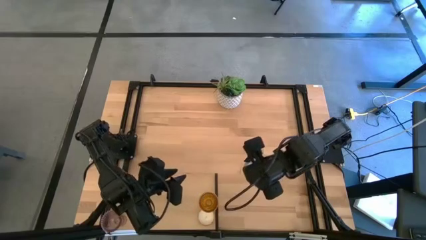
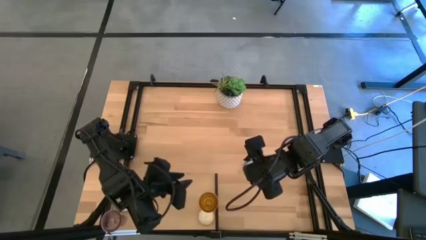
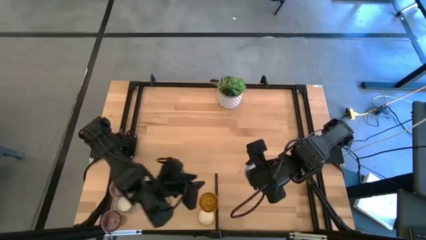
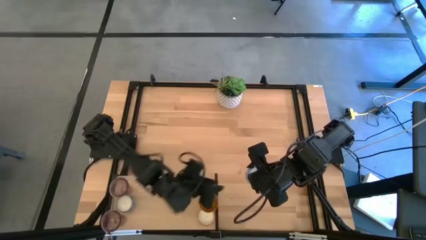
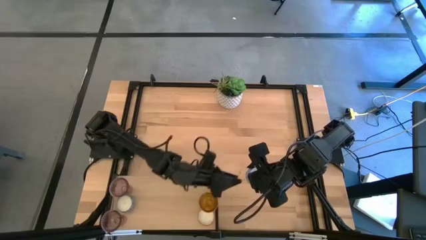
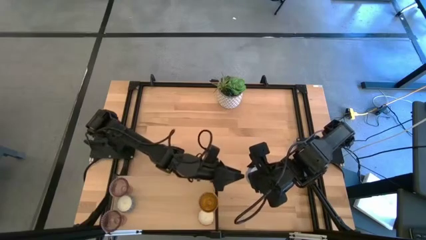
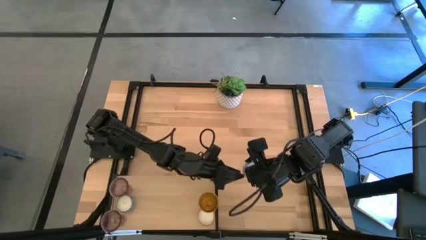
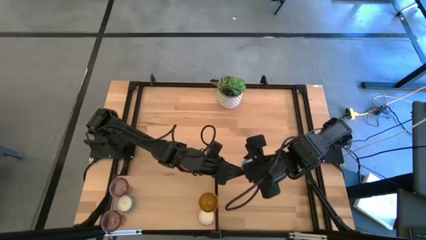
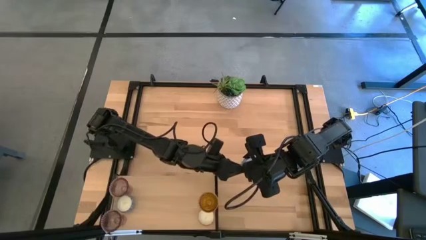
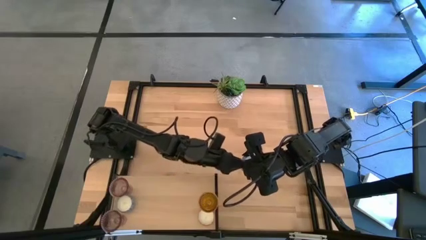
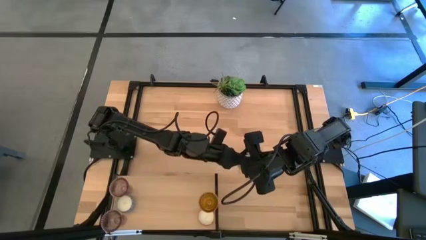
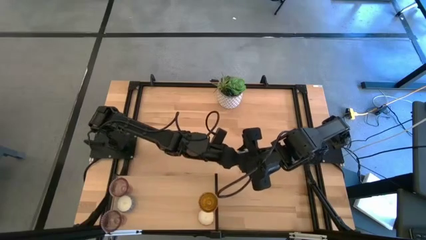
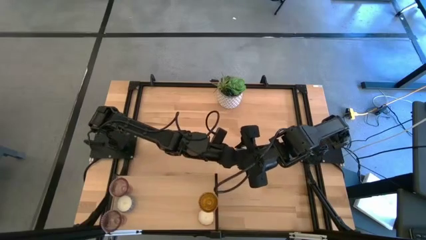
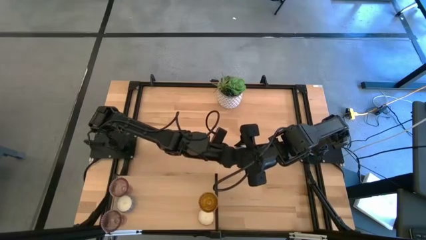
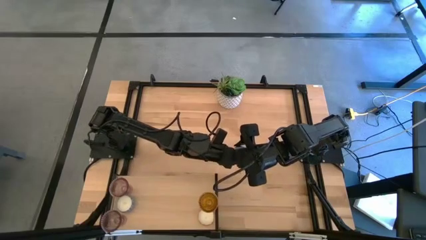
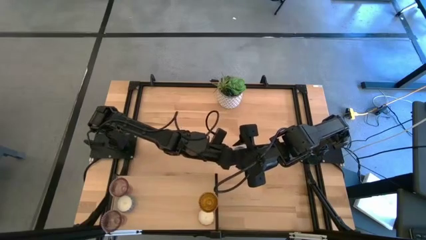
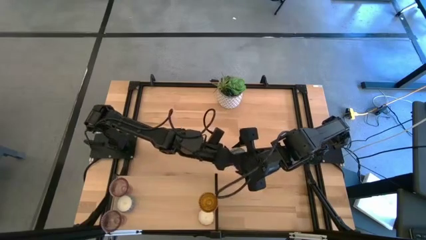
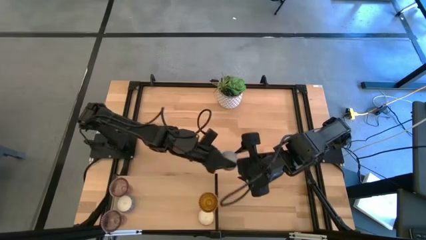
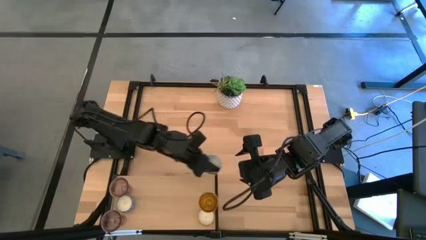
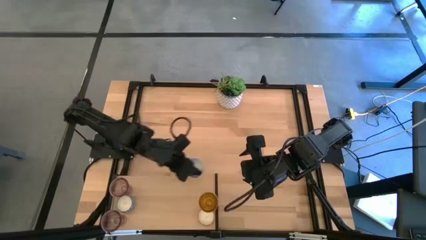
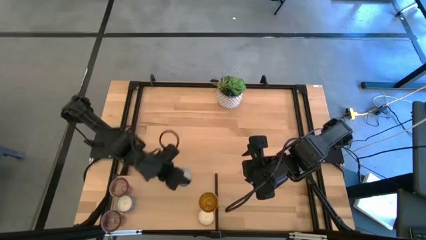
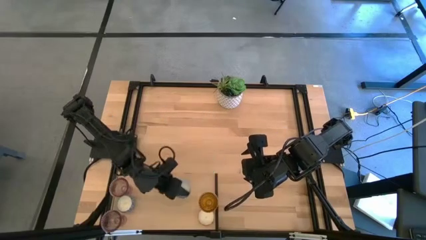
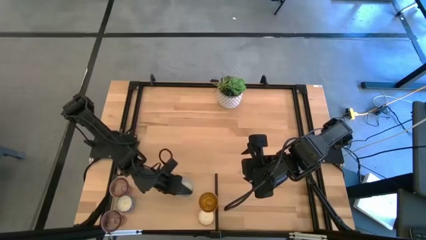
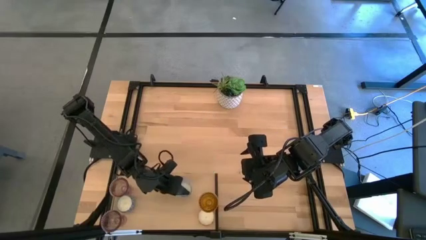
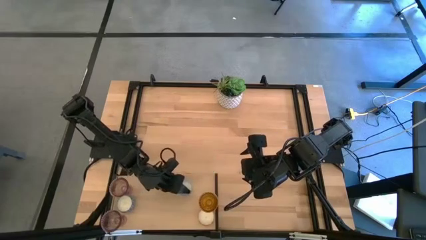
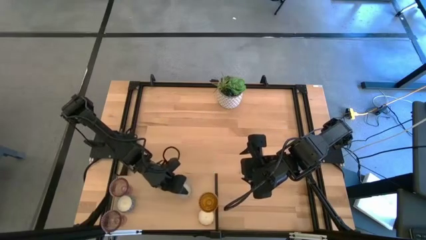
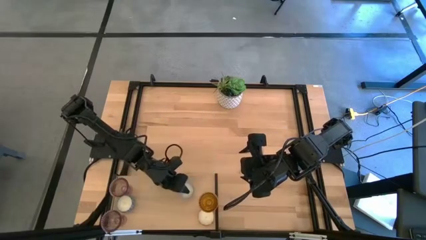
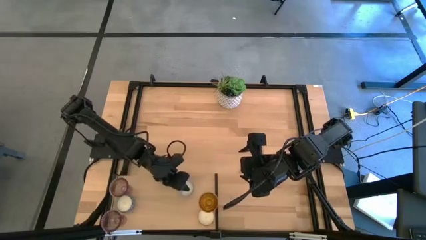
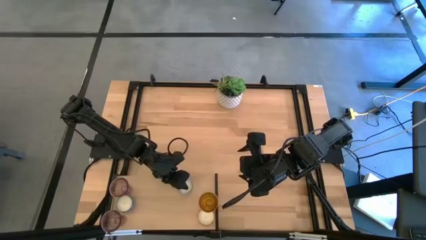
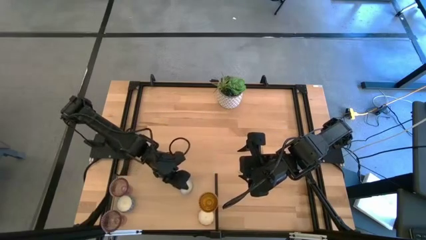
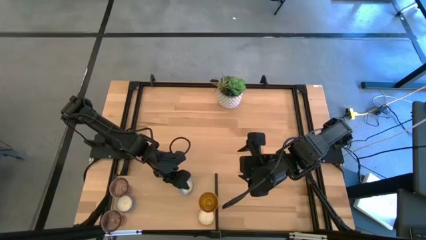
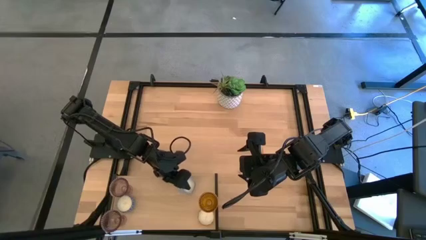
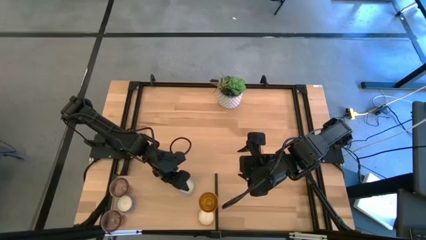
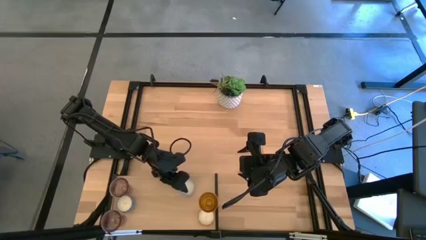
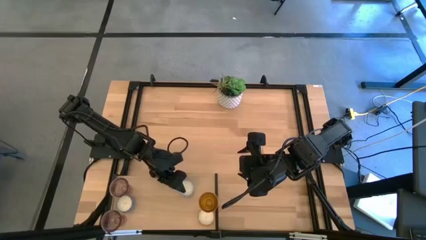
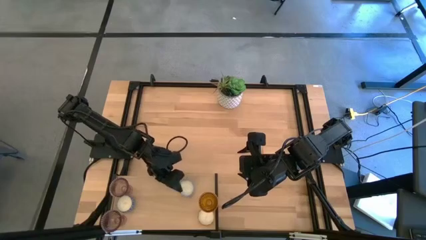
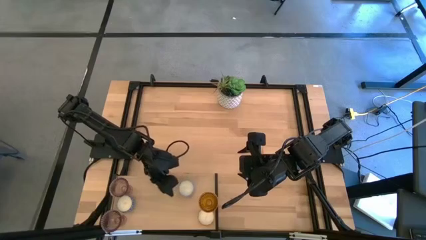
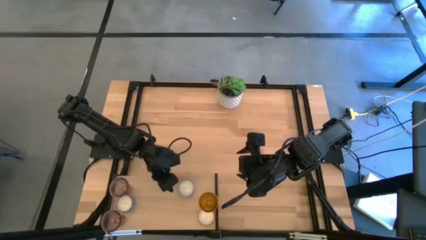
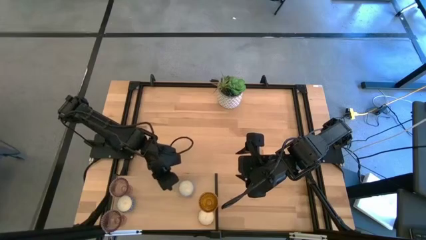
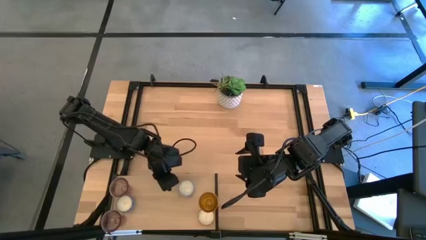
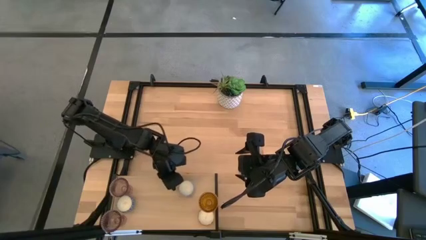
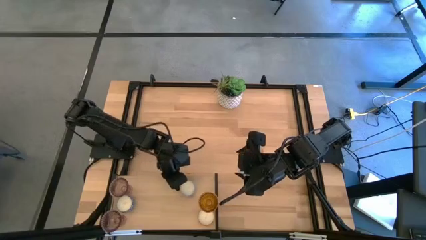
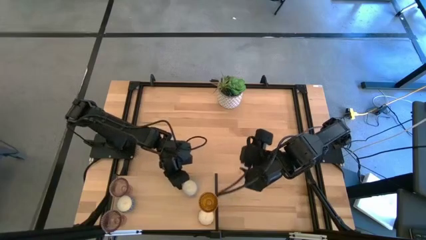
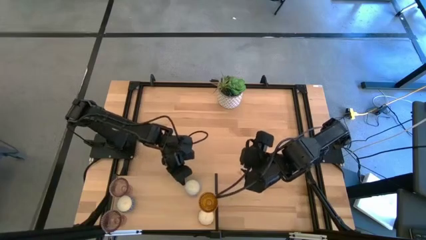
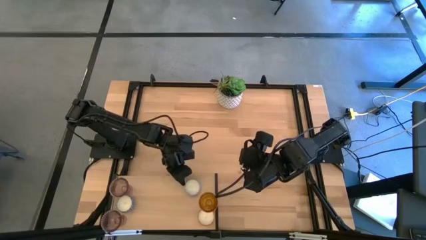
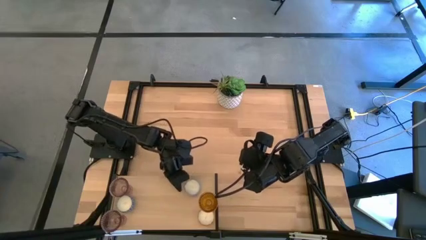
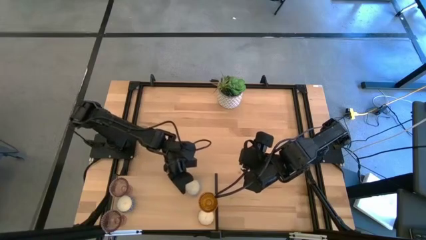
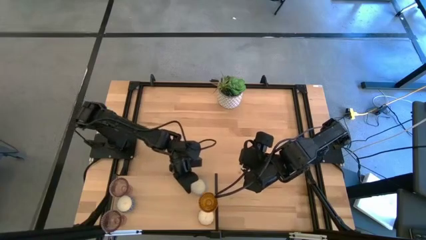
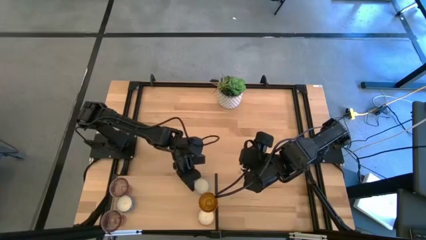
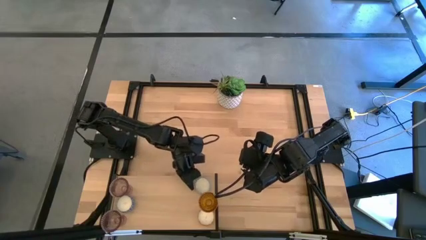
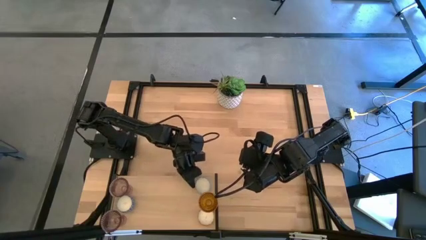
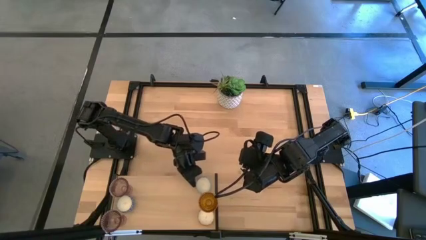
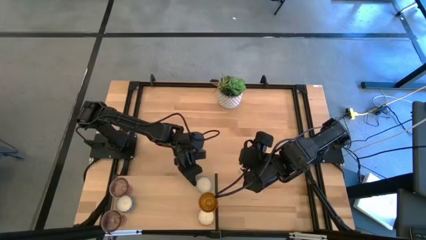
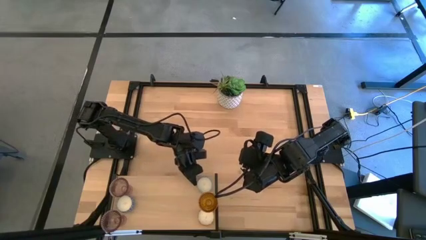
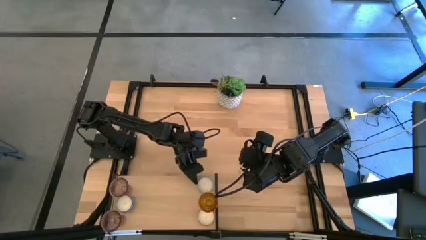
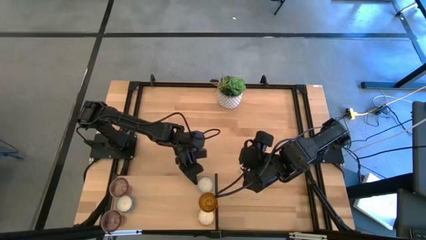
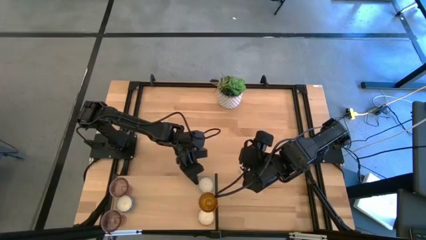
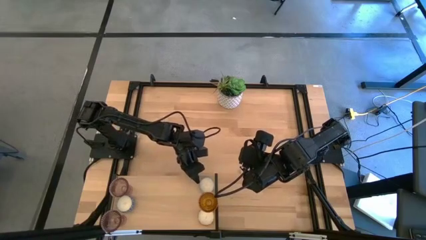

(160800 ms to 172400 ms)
Task: Pick & Place candle stick holders
Put the blue scented candle on the shelf

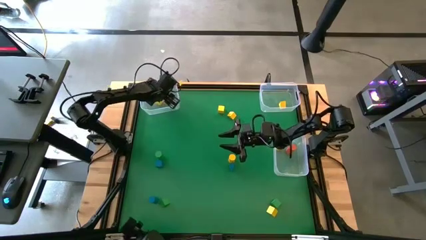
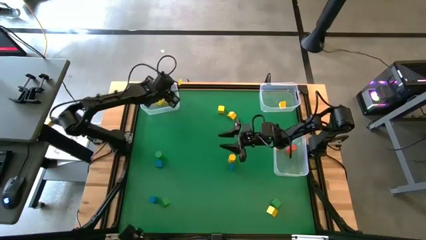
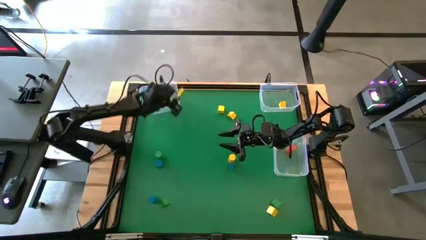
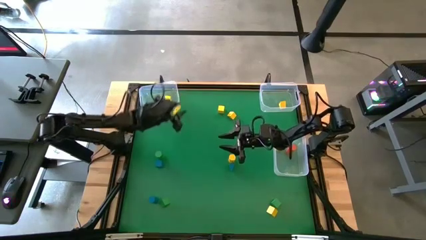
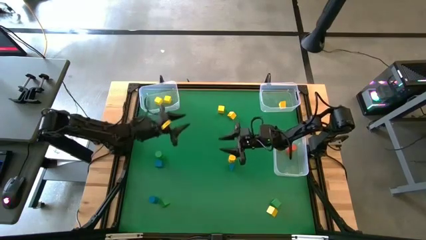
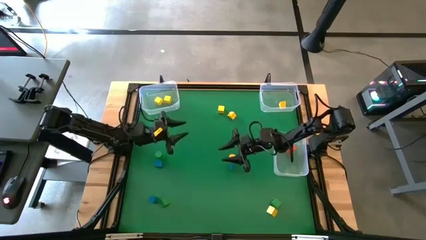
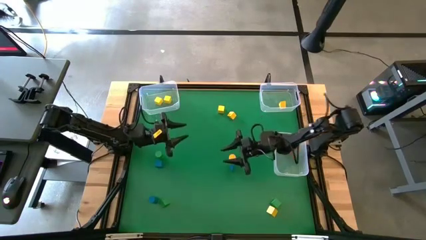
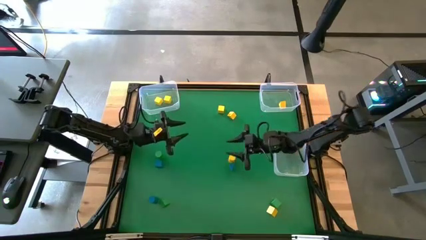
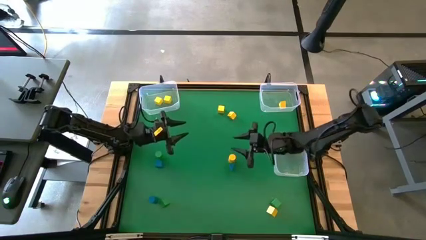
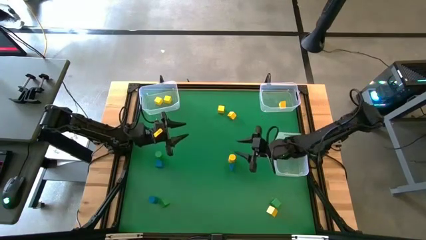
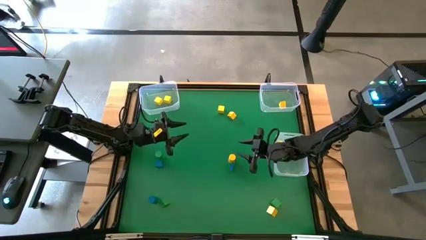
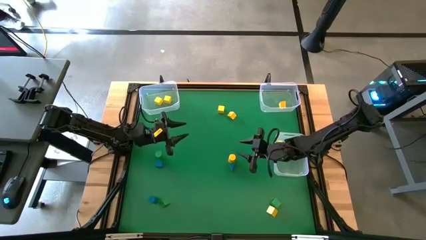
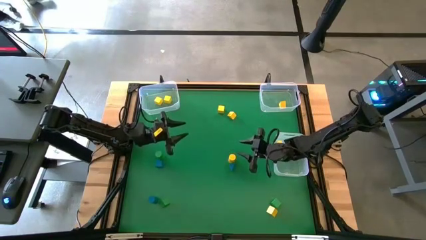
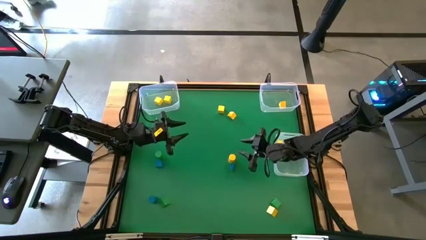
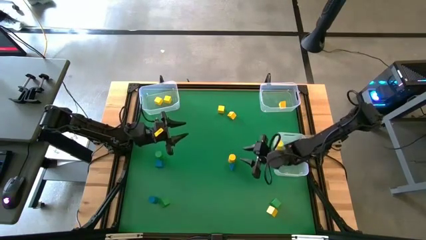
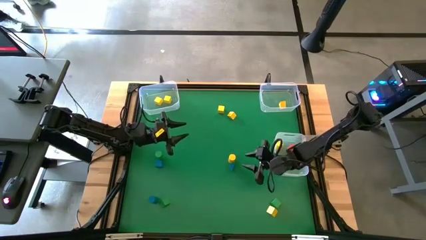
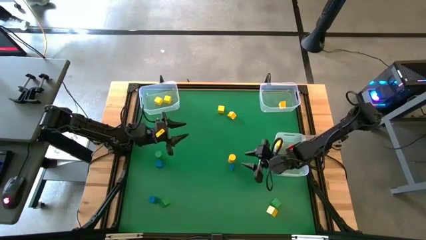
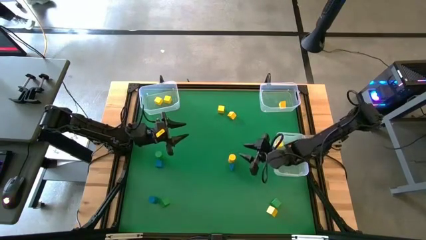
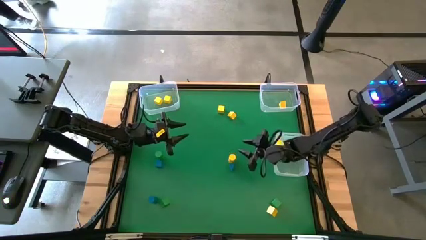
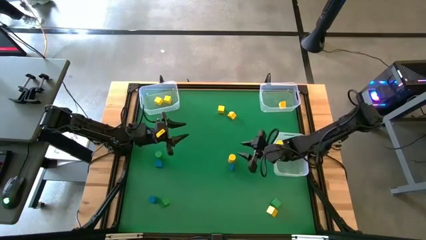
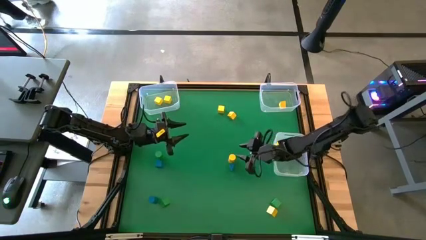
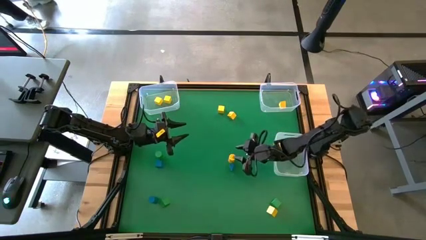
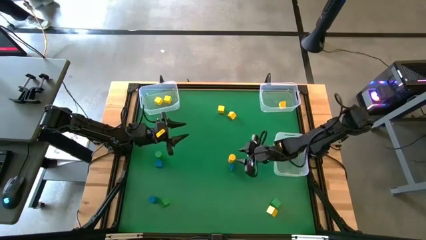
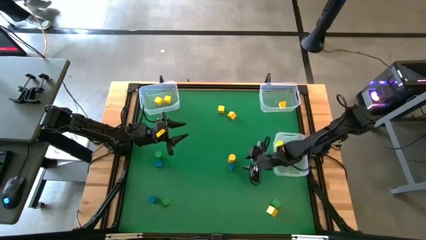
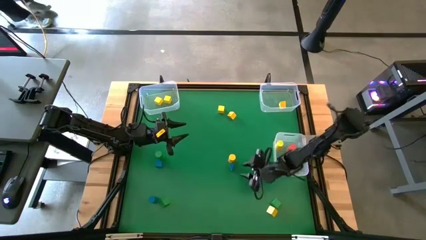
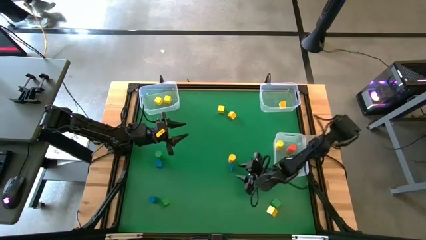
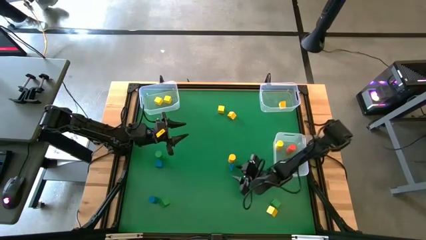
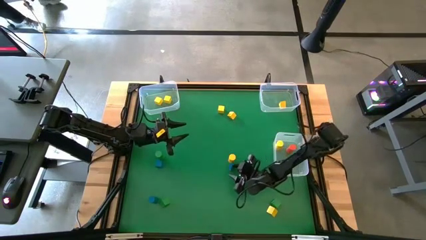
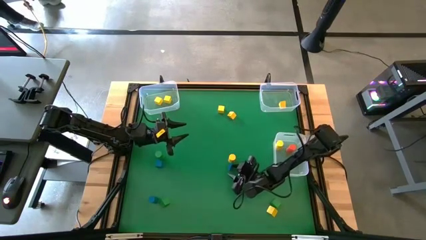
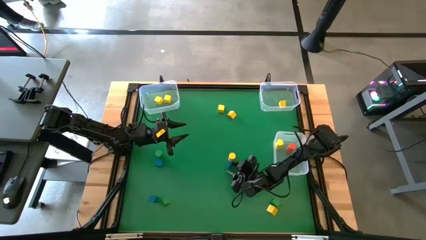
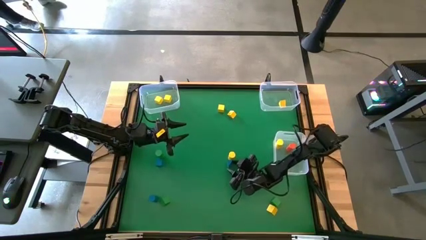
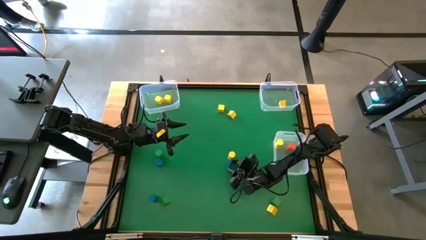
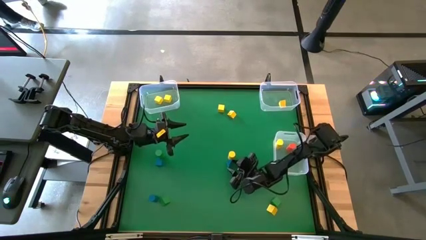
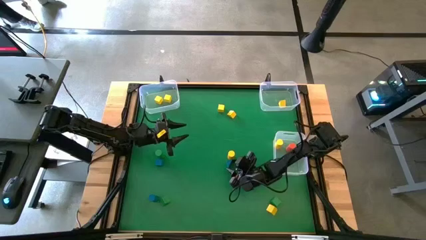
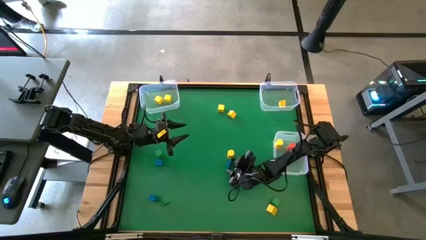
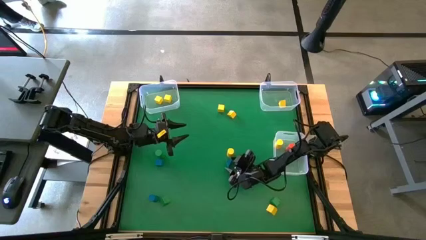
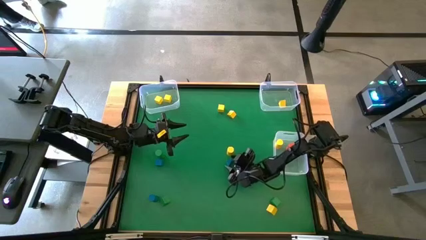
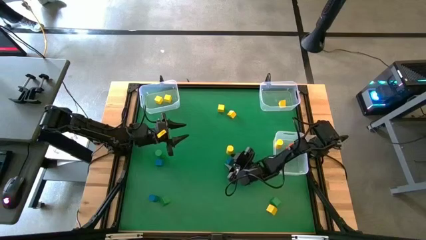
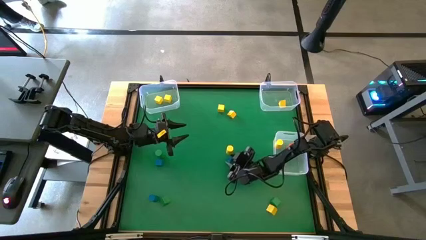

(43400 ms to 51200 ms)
Task: Sort blocks by size
Put the blue triangular block into the top right transparent bin
